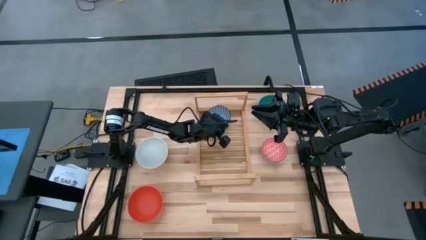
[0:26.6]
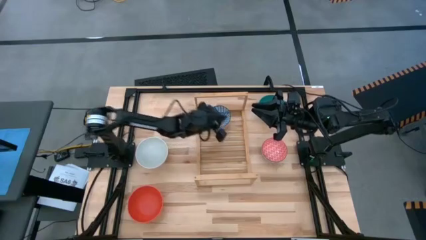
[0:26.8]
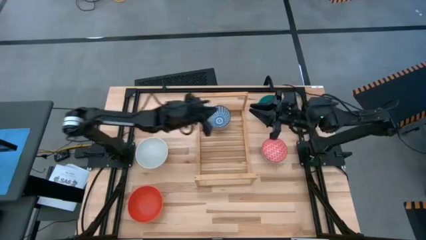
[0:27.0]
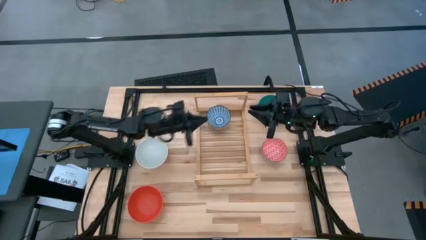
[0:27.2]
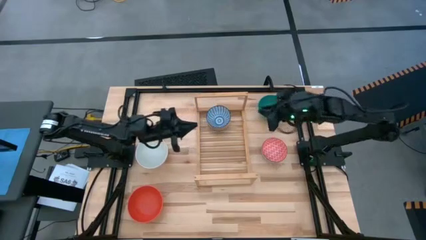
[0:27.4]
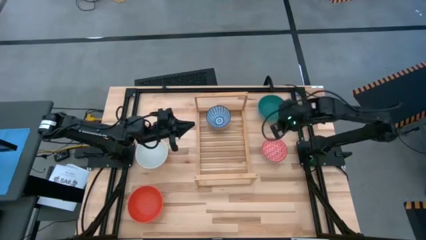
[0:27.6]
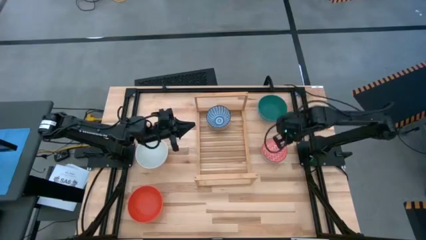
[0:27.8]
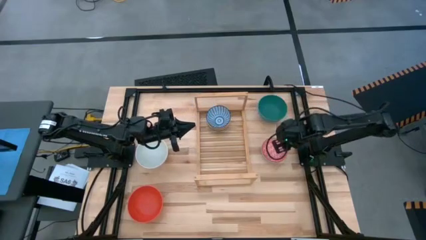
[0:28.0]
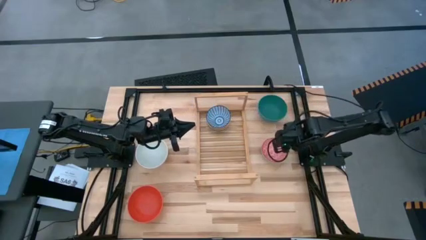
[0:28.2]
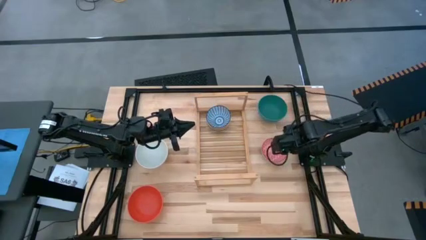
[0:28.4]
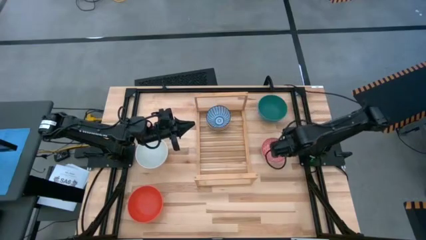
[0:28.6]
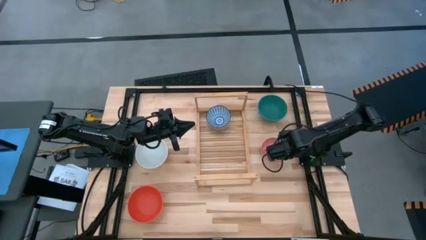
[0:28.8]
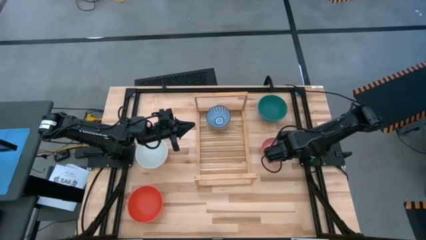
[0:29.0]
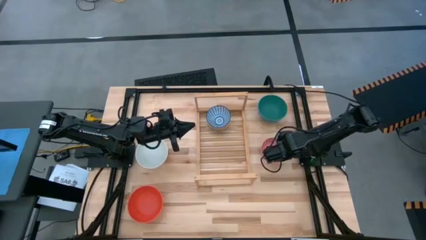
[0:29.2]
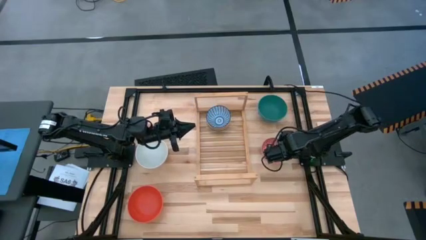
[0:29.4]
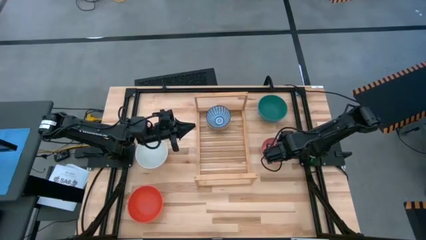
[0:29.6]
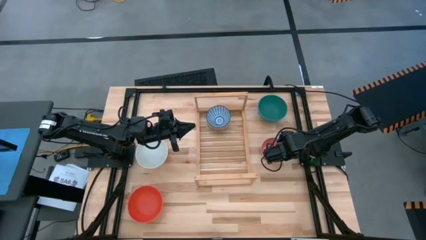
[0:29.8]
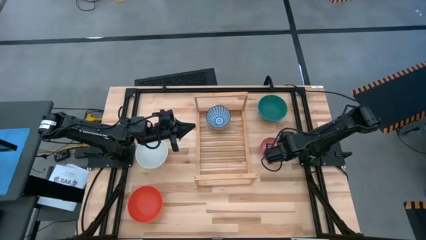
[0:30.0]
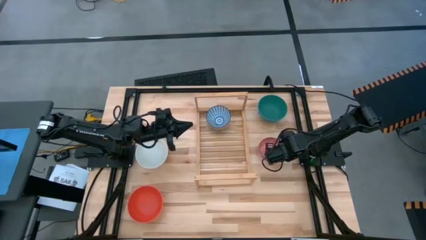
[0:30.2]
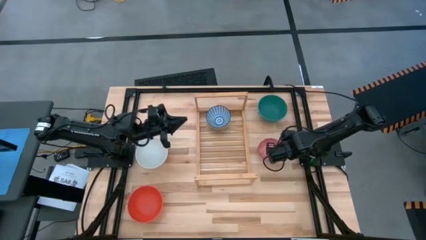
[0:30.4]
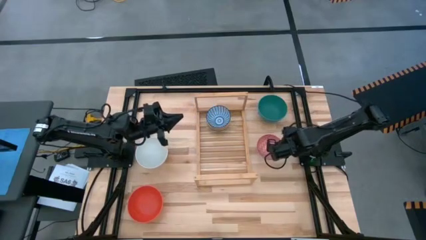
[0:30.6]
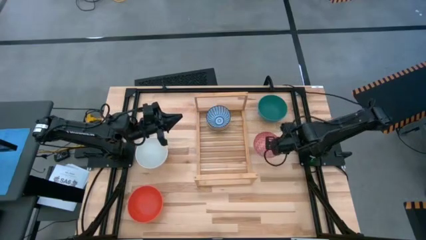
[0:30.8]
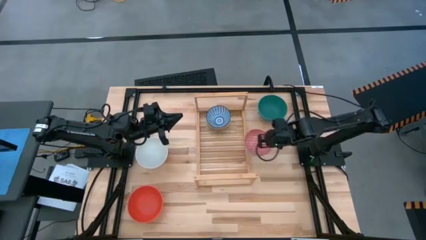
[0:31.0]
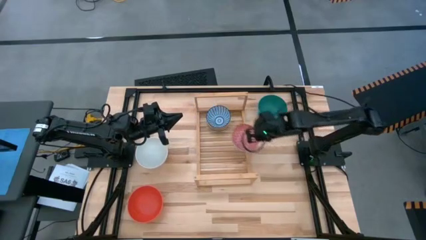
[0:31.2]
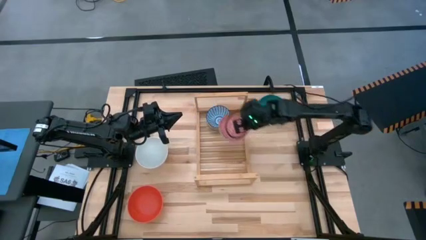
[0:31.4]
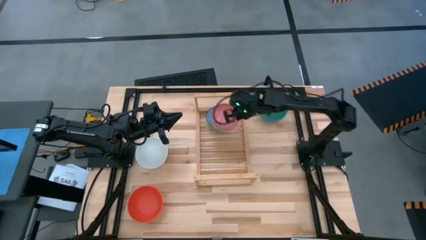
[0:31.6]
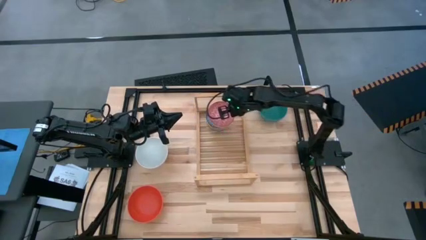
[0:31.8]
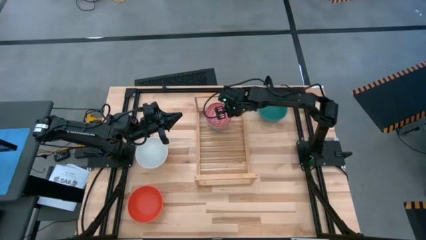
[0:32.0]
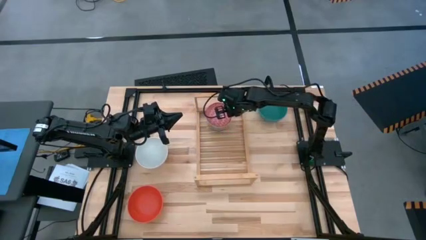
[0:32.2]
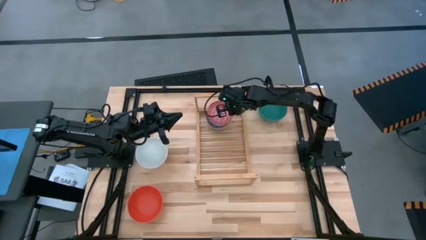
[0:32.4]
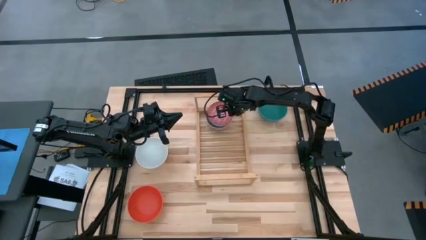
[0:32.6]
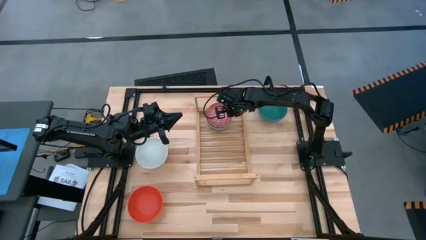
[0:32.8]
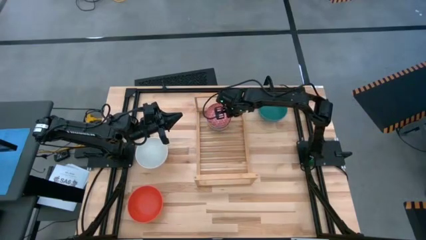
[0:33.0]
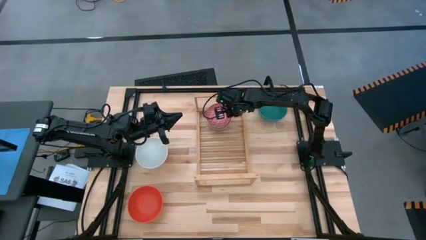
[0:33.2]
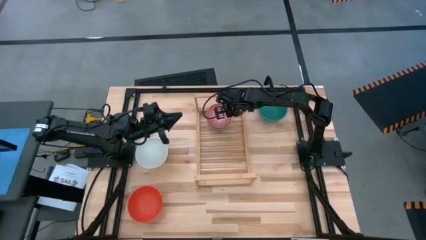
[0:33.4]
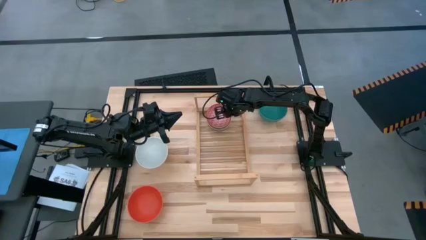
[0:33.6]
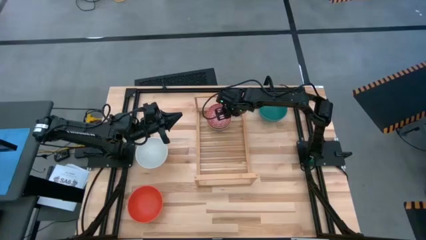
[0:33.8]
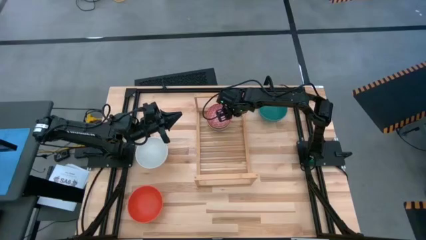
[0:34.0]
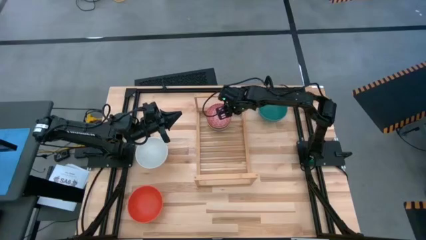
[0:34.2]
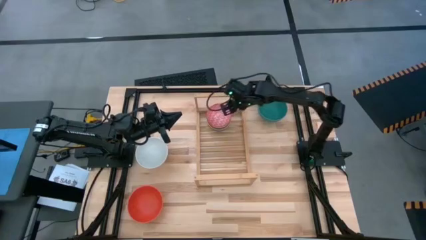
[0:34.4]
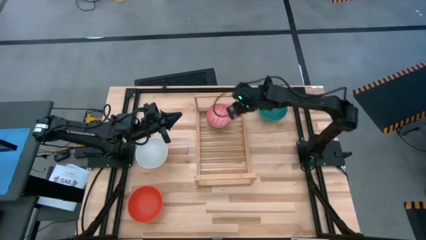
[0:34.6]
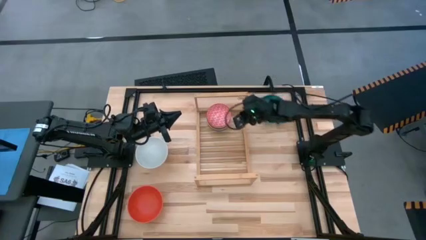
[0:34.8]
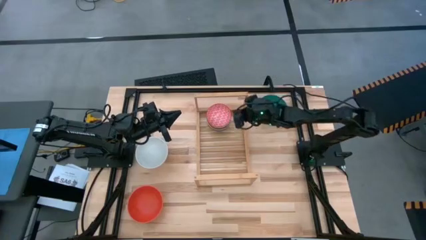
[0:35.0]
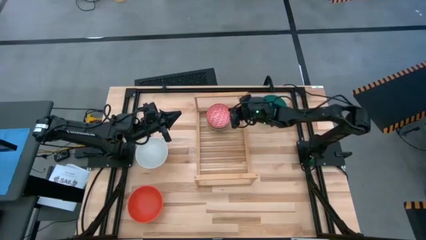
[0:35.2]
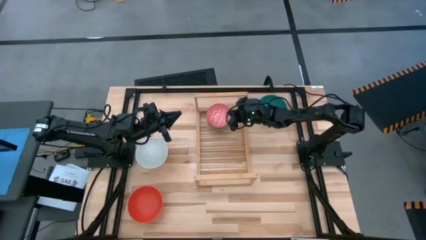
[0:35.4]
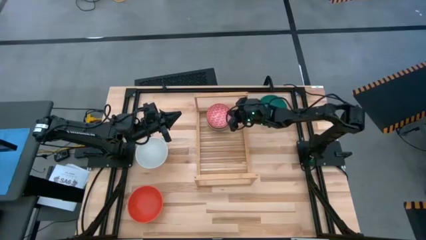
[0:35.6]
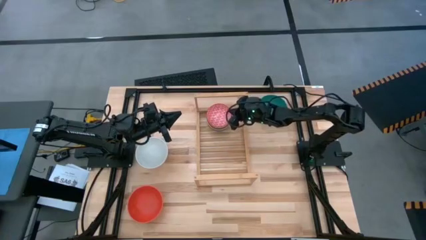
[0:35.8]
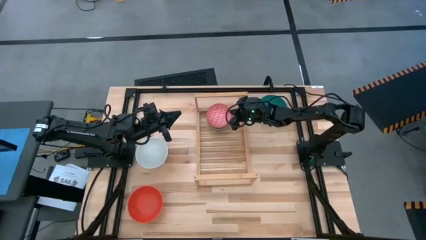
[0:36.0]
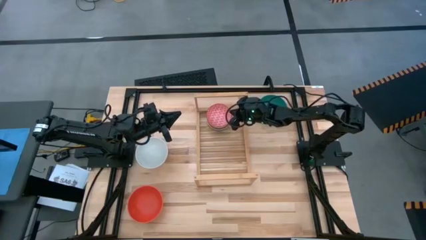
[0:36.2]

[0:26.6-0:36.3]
Task: Place and stack bowls onto a shelf
Stack the red patterned bowl on top of the blue patterned bowl on the shelf

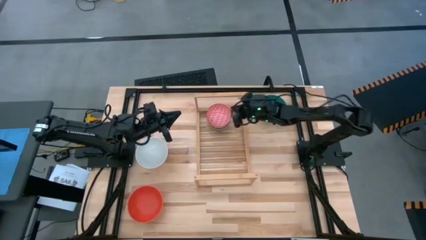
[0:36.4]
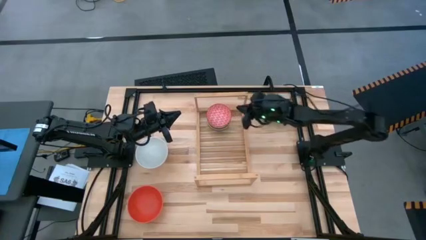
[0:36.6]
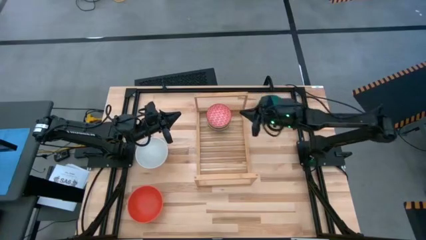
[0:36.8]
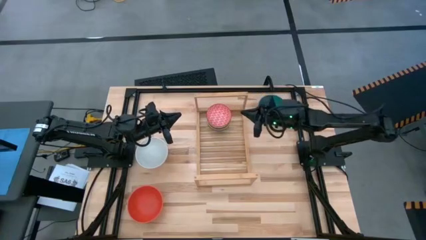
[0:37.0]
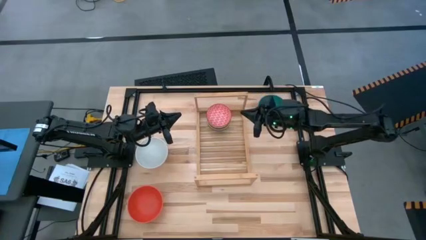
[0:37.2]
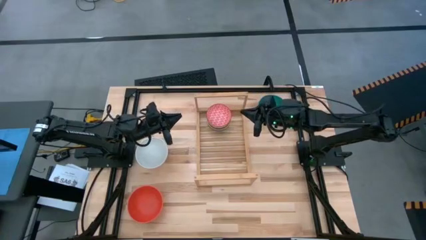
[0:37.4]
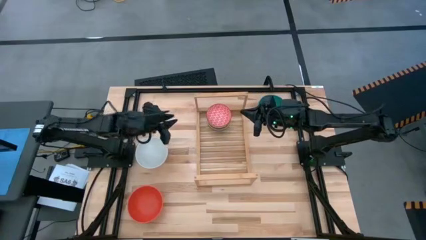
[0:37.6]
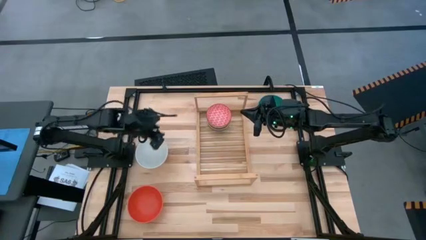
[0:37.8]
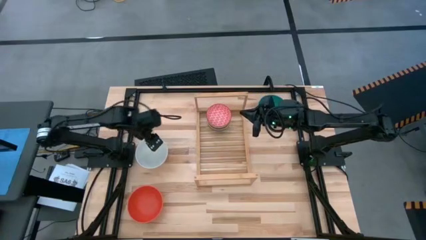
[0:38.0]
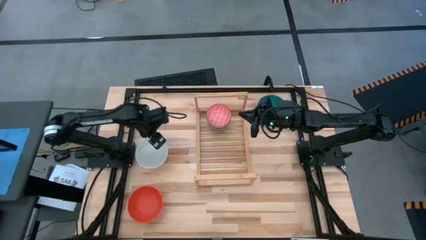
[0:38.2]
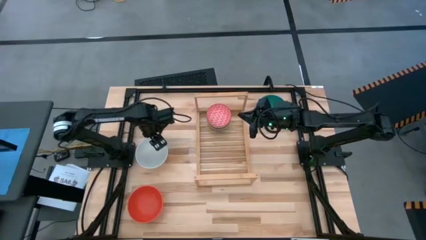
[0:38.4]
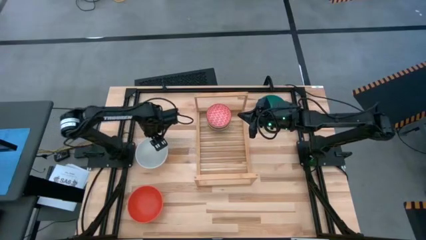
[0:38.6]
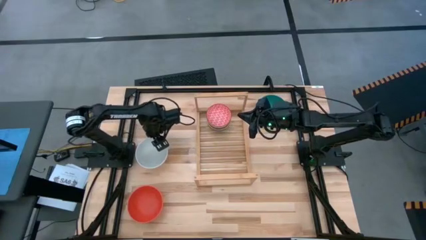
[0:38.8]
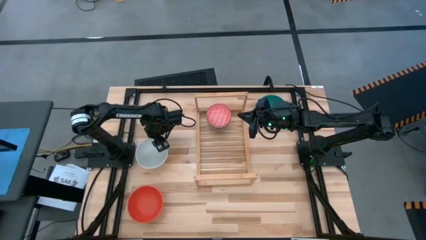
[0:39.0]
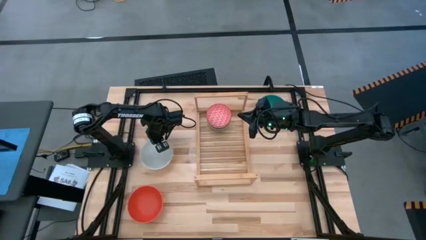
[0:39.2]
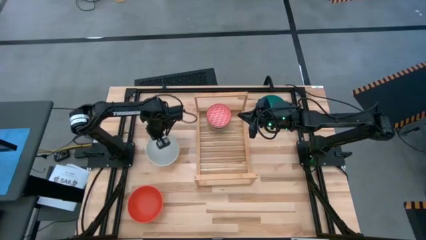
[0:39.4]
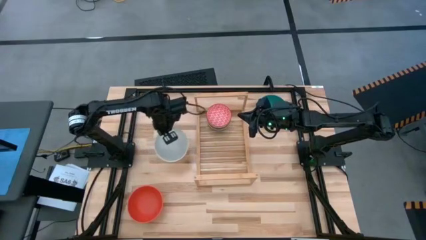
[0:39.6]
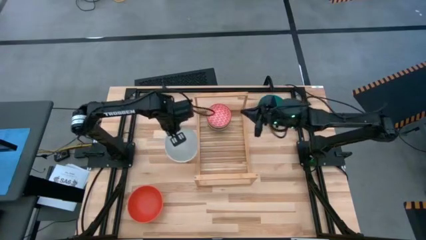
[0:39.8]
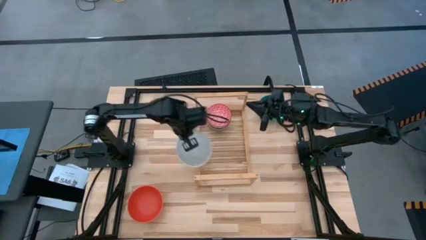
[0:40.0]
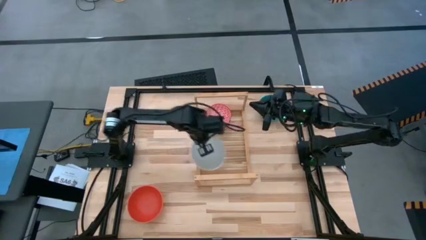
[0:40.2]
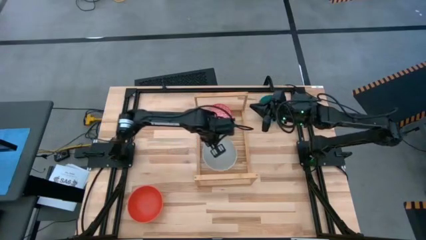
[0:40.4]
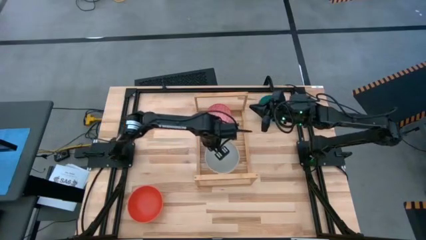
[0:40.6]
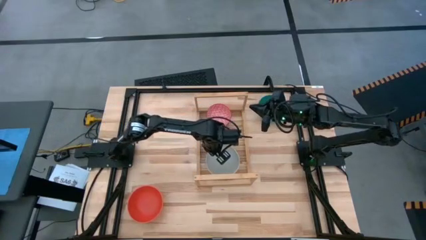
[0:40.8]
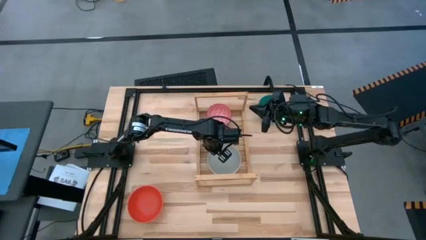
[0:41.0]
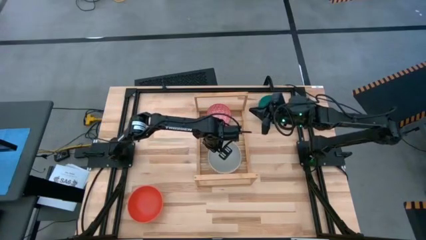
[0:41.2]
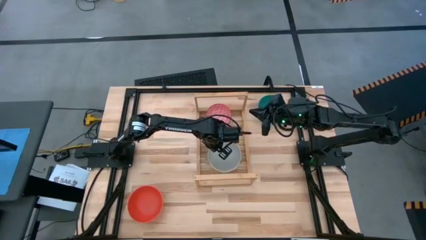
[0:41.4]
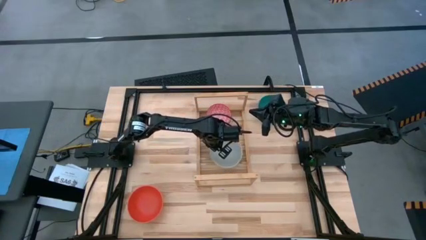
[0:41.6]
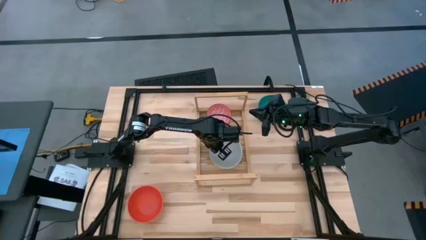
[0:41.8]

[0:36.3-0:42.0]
Put the gray bowl on the shelf
